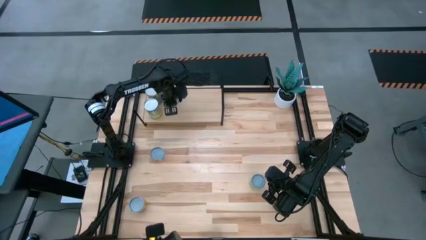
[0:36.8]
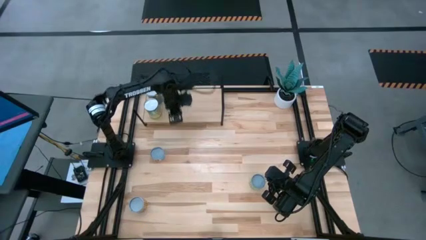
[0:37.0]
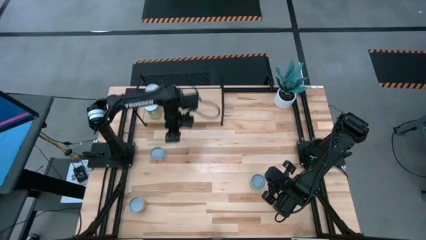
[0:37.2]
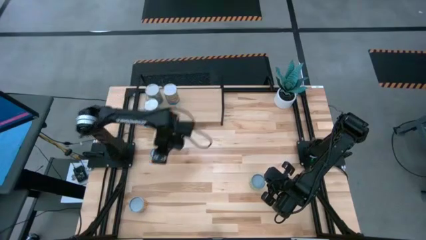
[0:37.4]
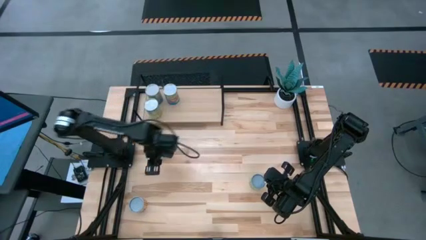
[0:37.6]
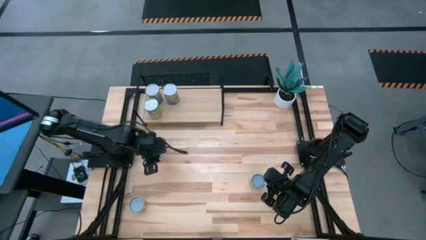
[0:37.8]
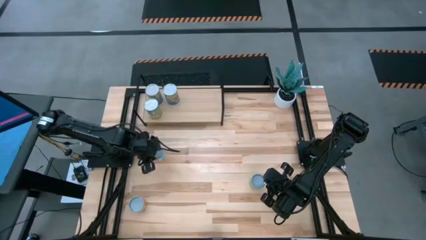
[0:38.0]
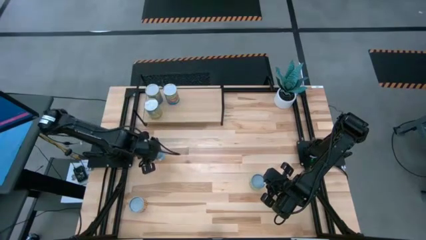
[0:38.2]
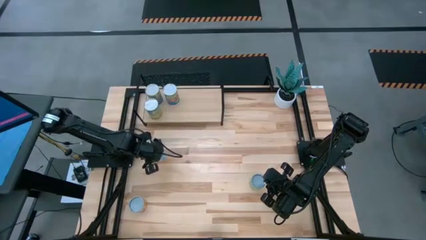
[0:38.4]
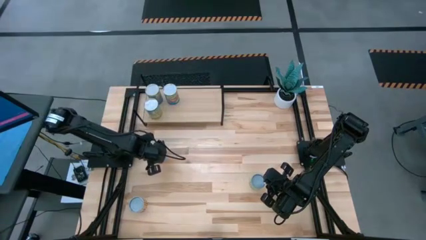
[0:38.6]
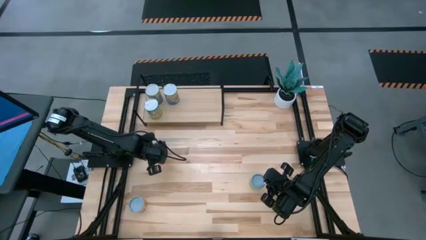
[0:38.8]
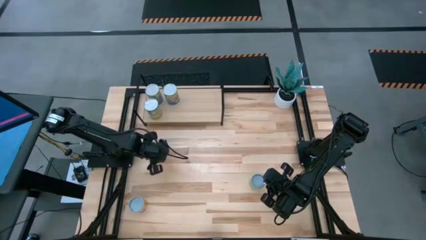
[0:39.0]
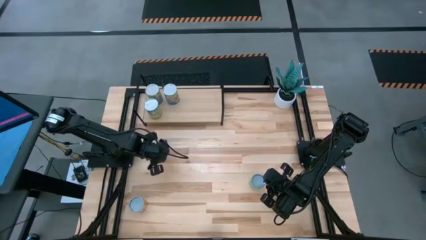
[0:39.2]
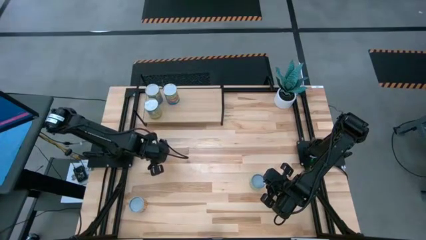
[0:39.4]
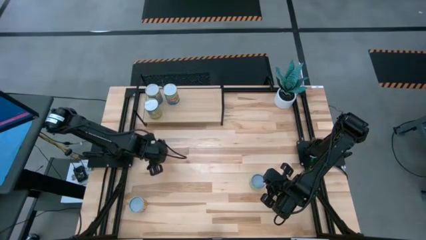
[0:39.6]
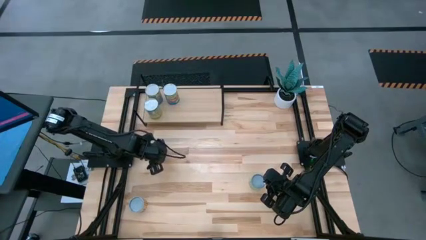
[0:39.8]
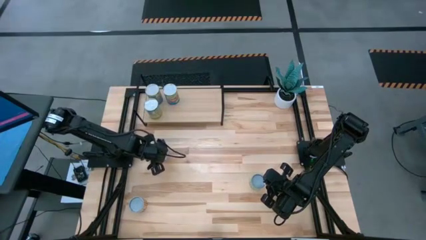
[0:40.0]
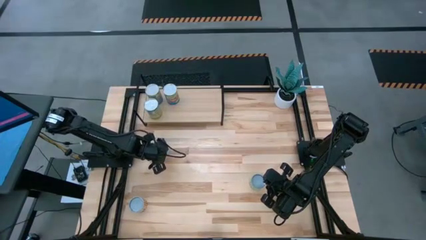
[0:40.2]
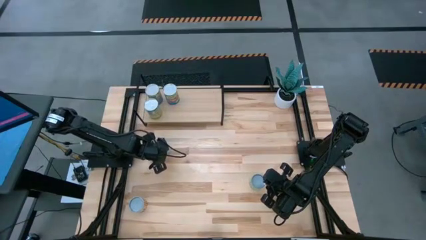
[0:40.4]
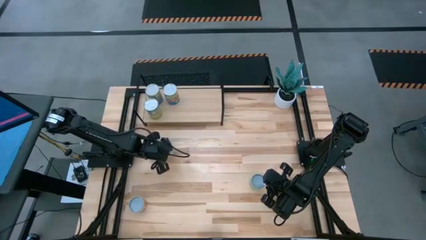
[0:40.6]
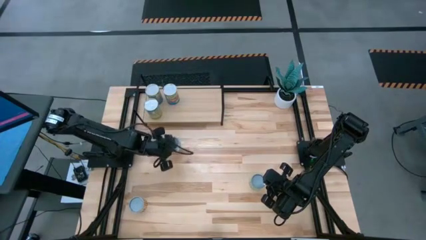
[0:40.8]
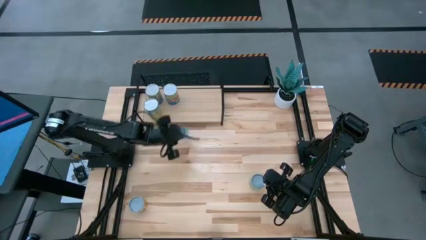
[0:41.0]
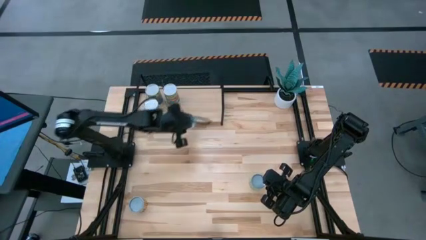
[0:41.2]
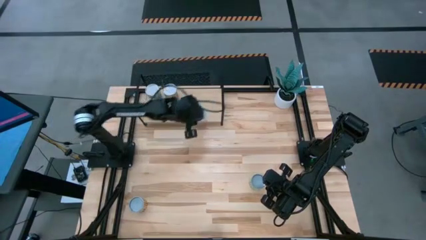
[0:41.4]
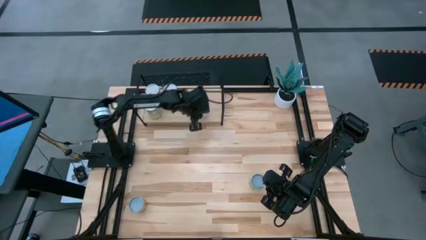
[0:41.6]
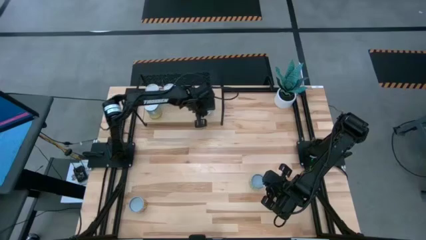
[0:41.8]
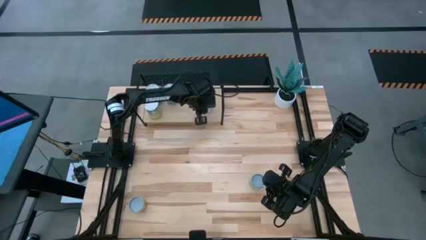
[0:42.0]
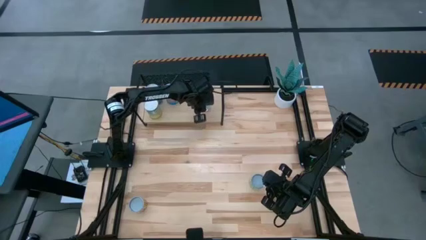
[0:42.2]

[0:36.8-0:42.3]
Task: Pick and place cans onto a shelf
Put the tuna can on the shelf

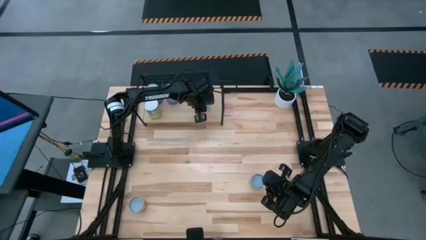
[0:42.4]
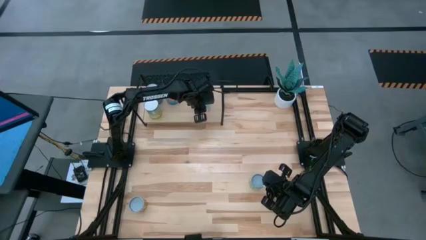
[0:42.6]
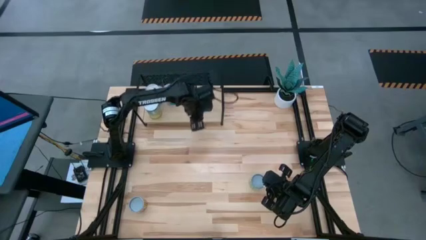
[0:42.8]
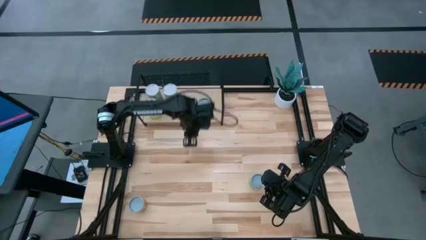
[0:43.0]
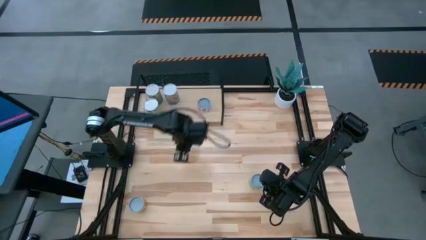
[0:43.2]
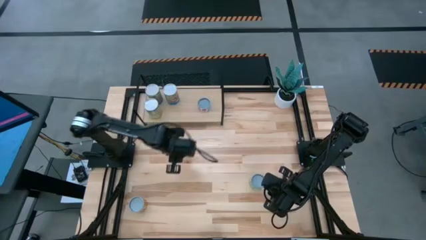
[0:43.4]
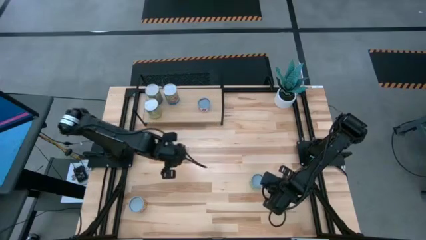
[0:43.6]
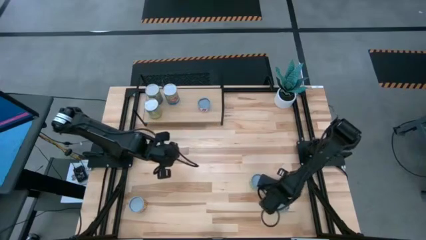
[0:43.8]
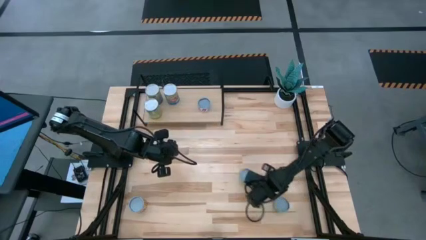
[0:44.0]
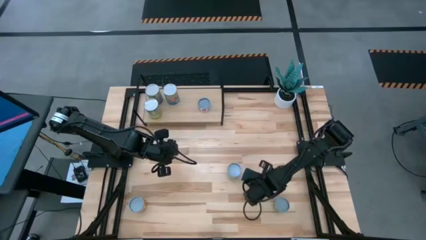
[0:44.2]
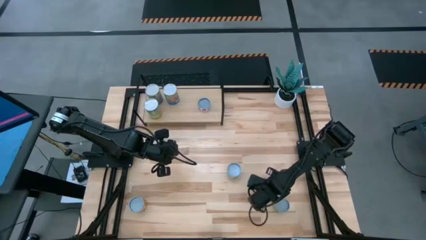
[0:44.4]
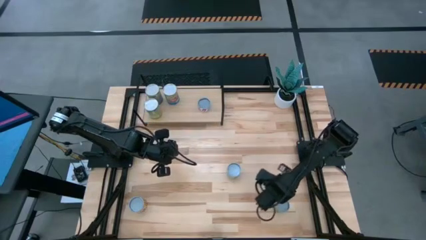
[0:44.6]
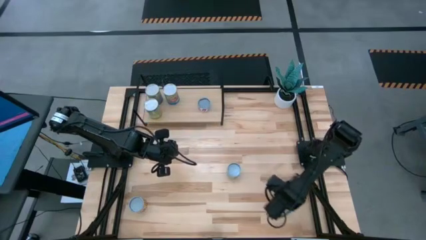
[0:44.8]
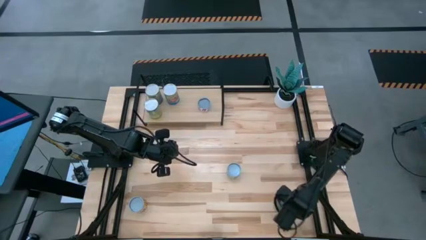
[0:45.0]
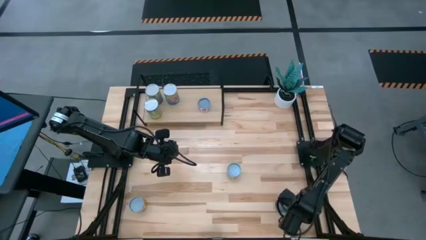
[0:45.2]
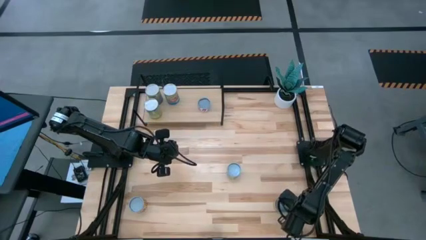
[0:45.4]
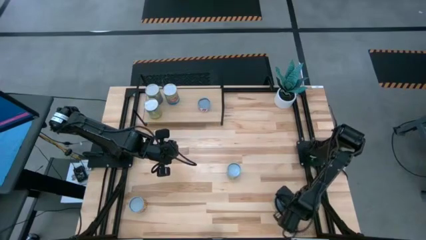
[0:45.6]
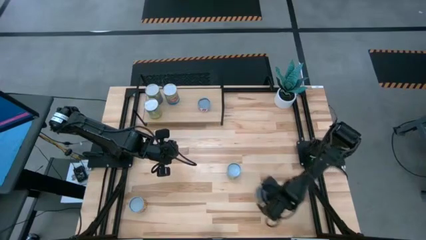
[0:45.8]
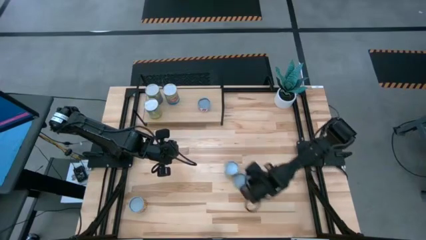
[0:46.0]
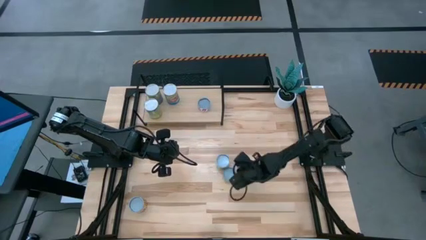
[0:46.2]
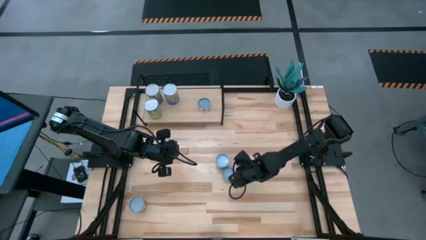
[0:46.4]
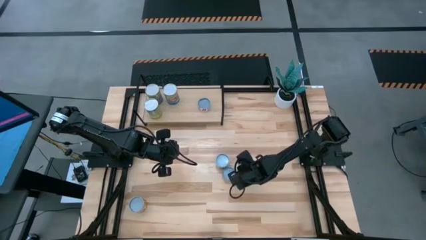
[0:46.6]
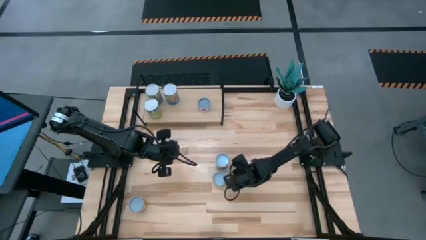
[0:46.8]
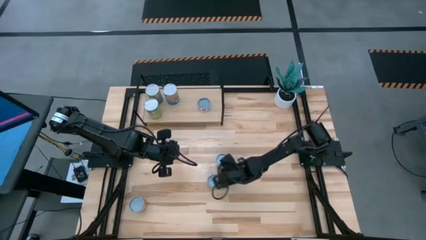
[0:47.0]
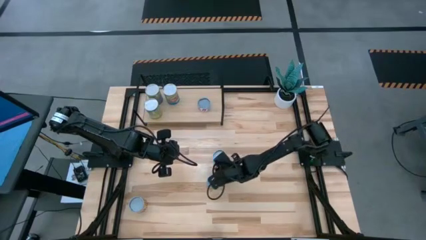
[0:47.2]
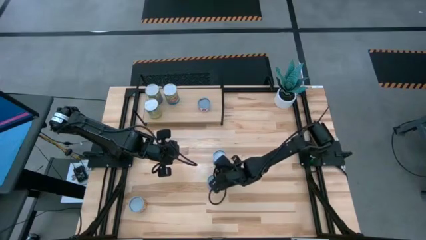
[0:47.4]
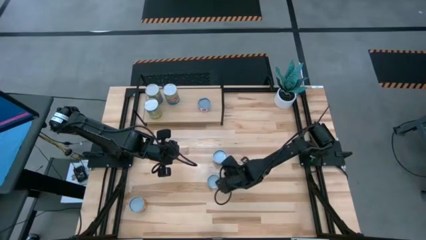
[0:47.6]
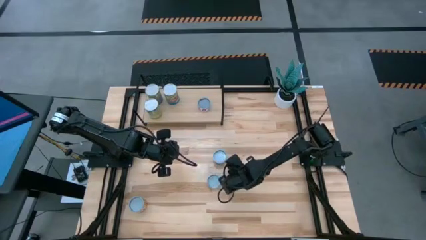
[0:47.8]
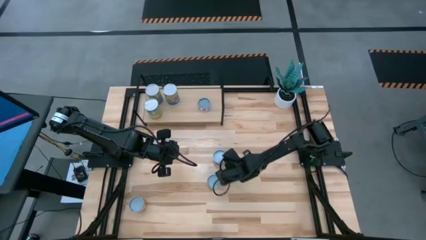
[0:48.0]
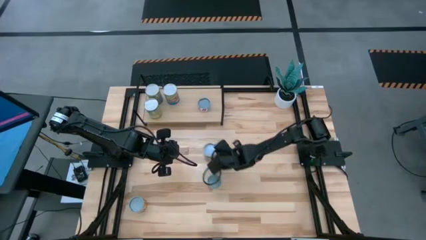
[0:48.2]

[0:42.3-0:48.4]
Move the cans to the center of the table

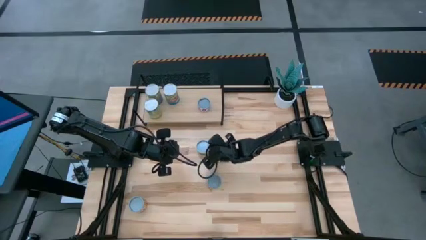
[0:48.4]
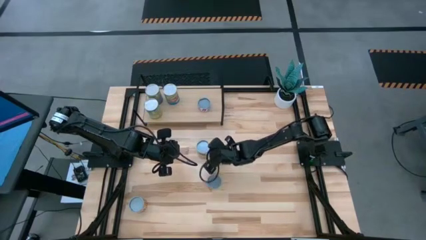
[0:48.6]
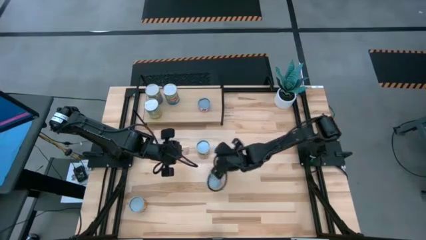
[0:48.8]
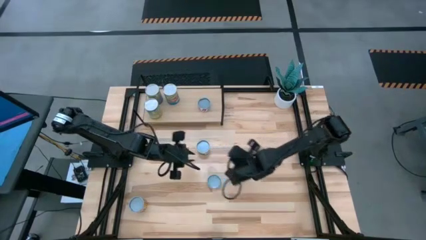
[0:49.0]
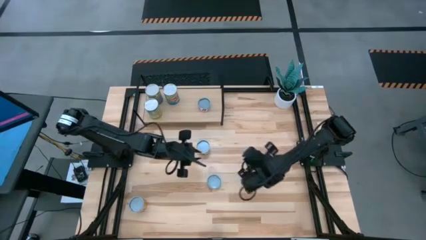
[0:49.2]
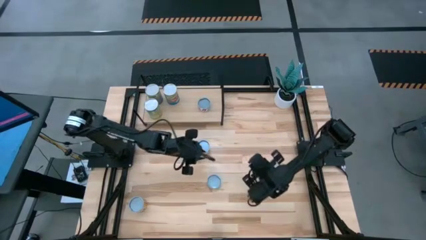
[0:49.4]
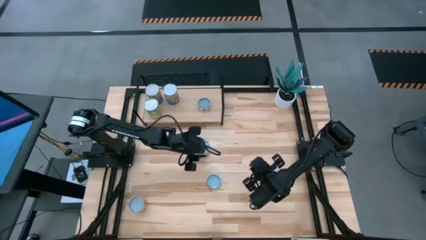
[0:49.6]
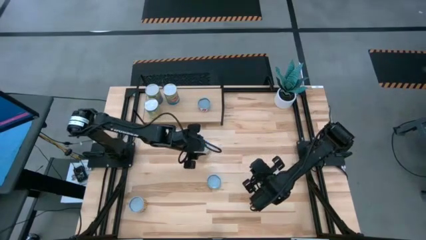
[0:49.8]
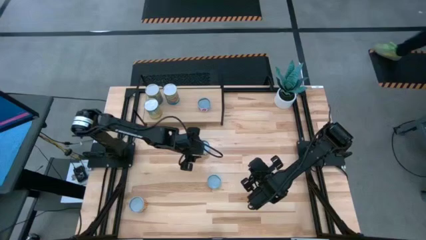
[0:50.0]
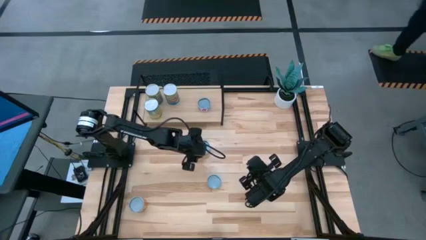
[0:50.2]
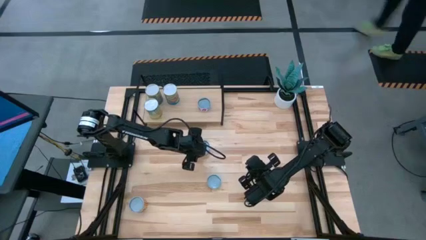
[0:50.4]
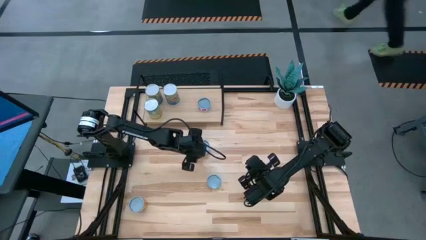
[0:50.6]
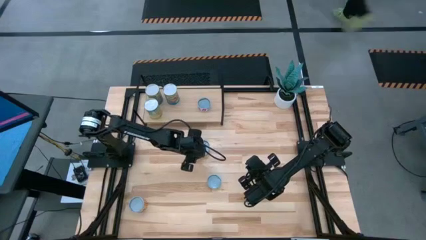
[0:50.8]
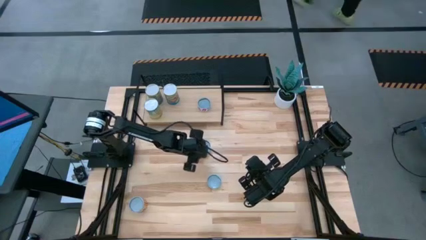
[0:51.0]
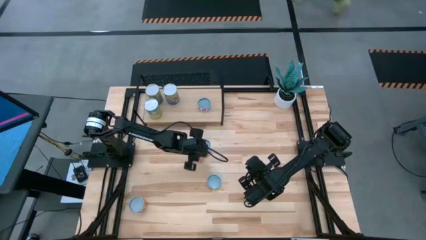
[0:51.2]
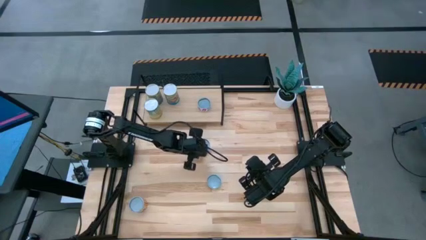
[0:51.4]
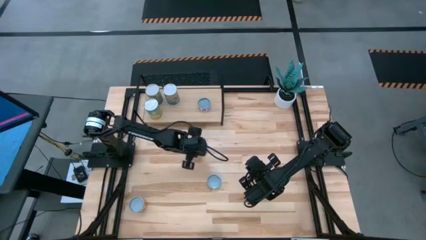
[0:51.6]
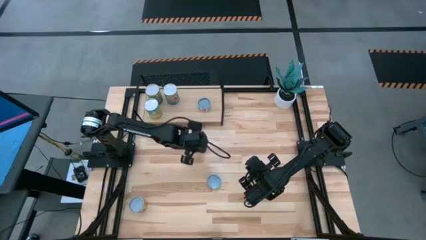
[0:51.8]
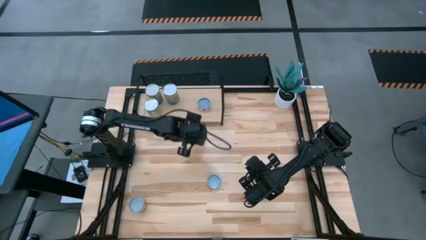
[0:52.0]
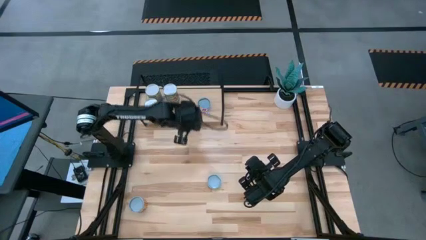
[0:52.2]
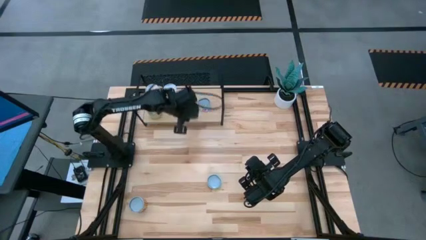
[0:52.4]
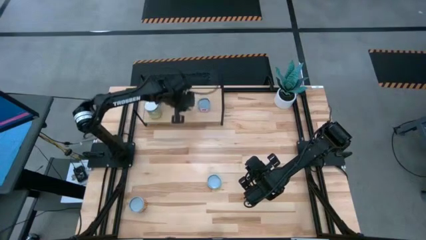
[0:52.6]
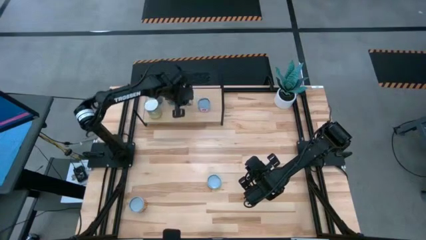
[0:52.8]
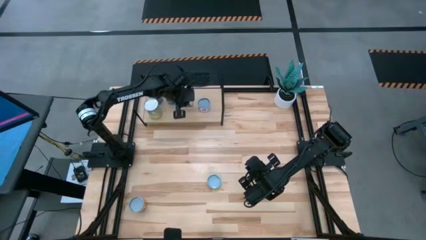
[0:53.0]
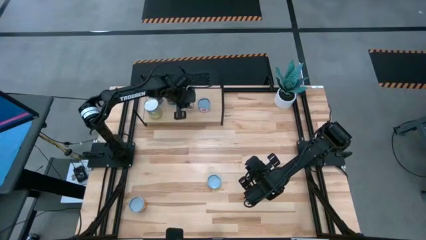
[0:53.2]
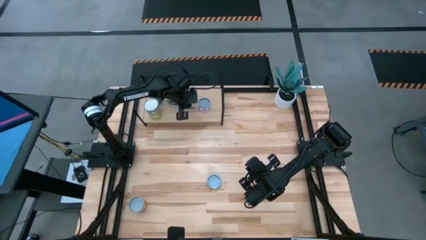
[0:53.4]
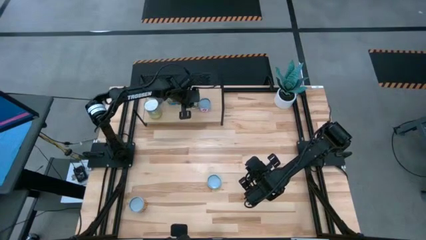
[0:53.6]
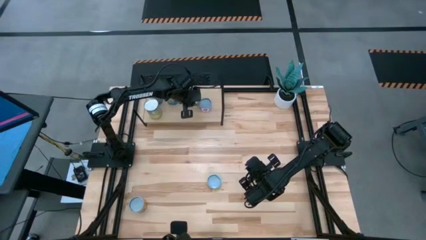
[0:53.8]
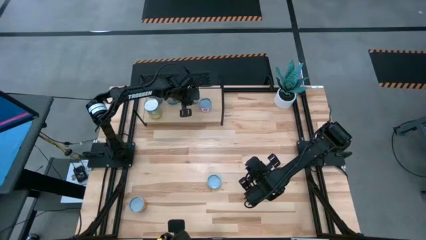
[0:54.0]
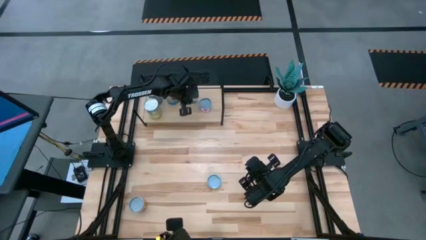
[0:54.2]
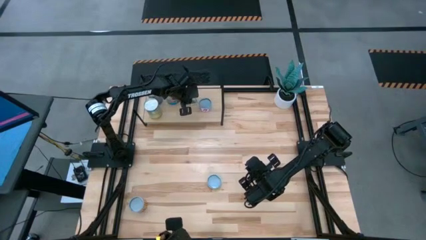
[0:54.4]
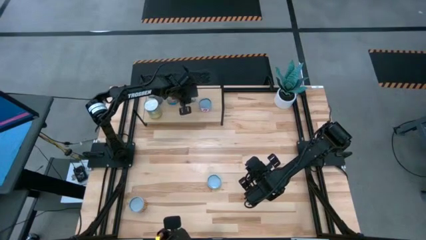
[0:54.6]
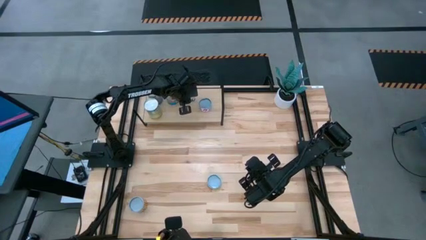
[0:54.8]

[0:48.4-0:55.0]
Put the green peas can on the shelf
